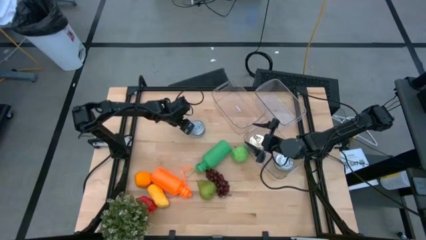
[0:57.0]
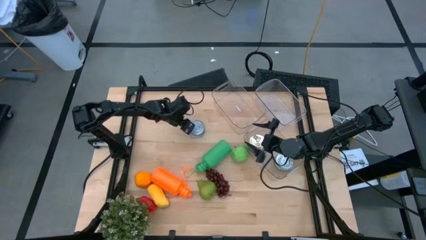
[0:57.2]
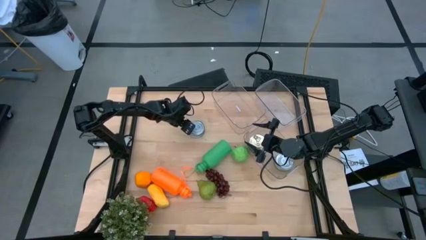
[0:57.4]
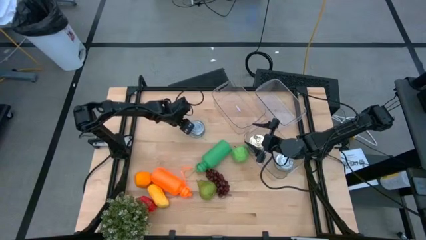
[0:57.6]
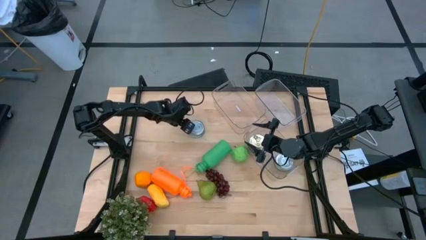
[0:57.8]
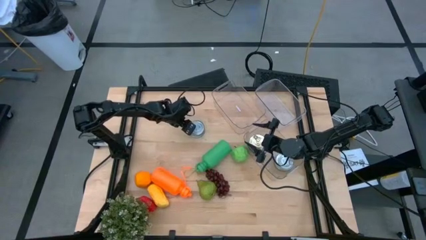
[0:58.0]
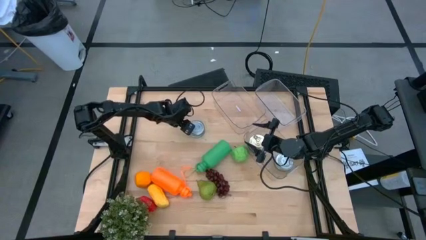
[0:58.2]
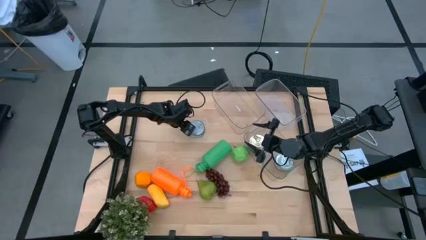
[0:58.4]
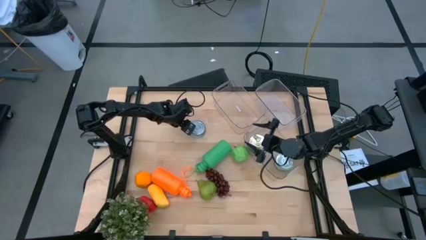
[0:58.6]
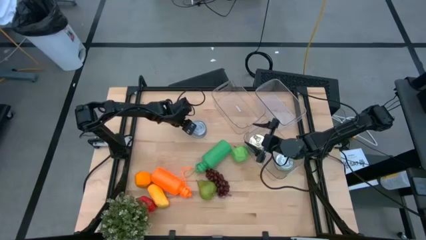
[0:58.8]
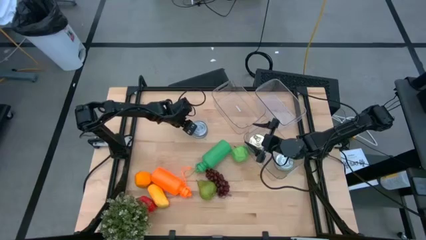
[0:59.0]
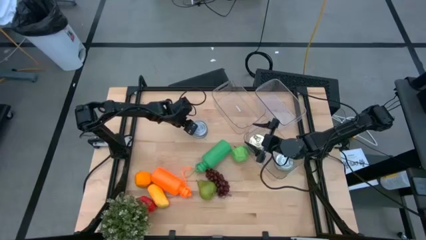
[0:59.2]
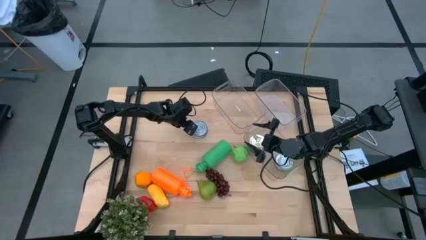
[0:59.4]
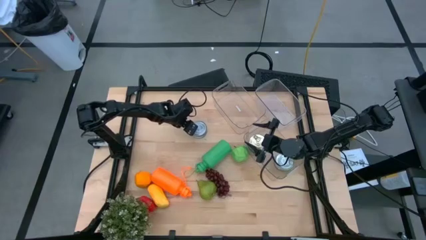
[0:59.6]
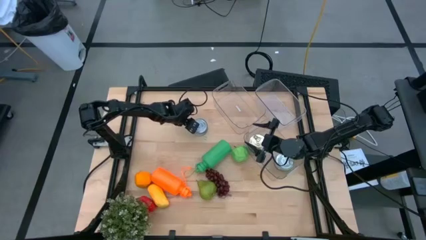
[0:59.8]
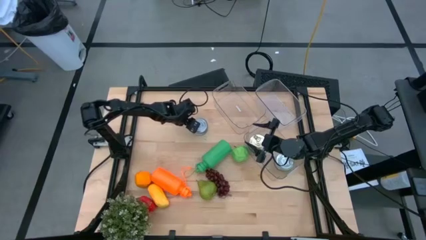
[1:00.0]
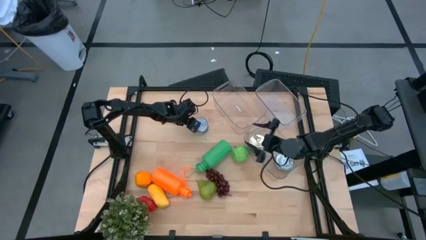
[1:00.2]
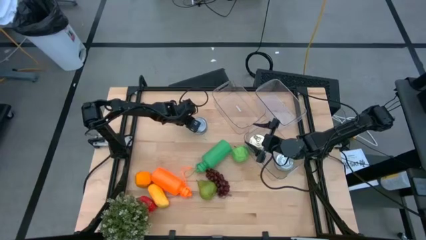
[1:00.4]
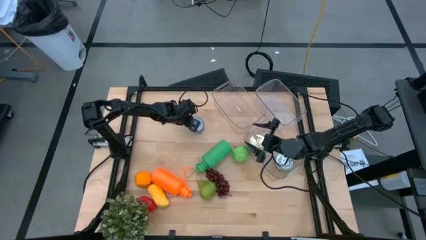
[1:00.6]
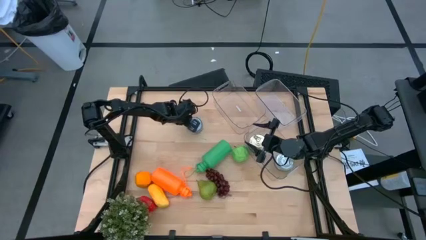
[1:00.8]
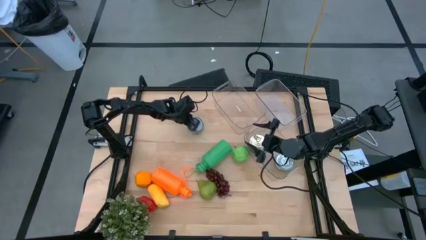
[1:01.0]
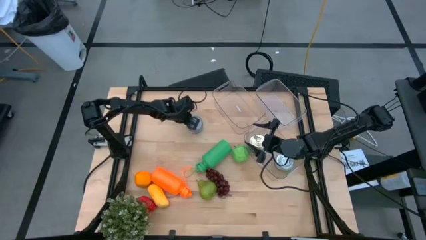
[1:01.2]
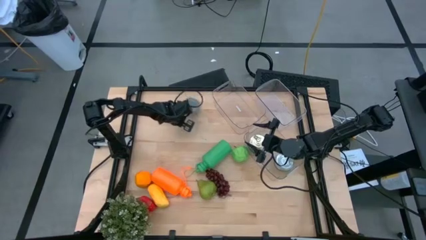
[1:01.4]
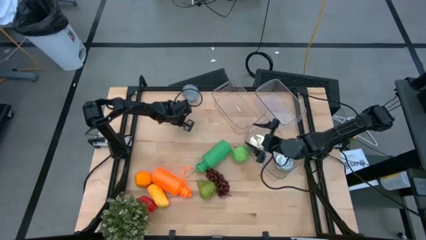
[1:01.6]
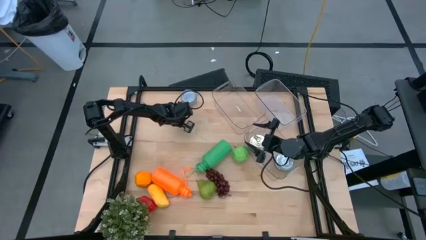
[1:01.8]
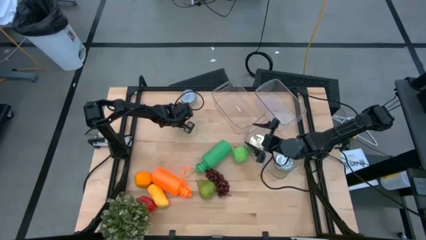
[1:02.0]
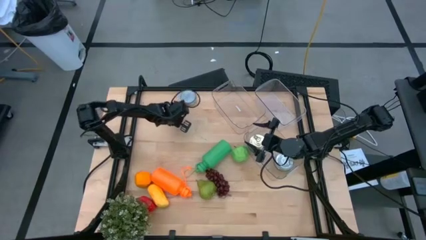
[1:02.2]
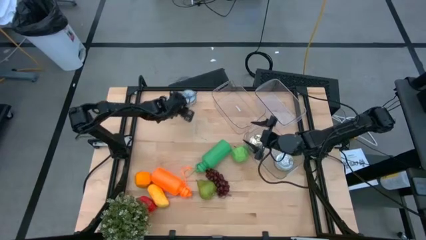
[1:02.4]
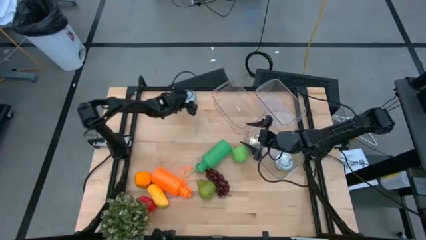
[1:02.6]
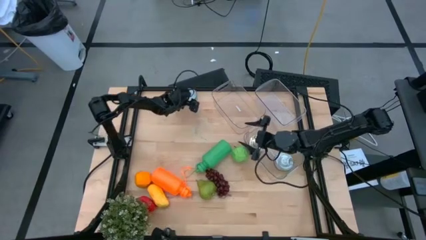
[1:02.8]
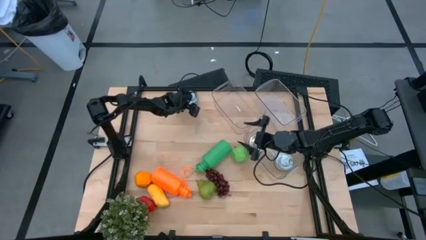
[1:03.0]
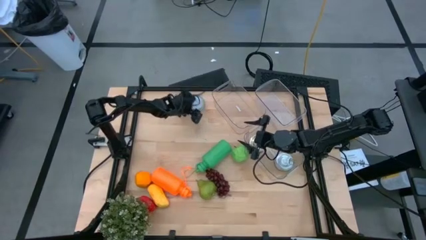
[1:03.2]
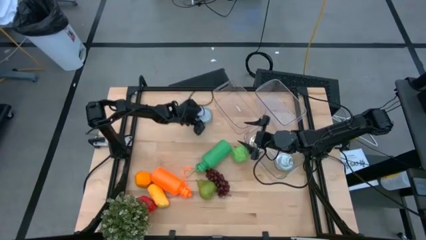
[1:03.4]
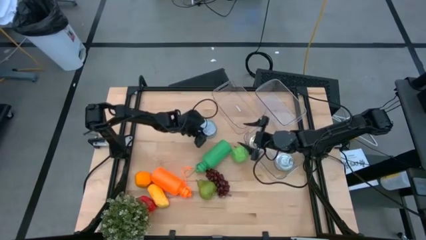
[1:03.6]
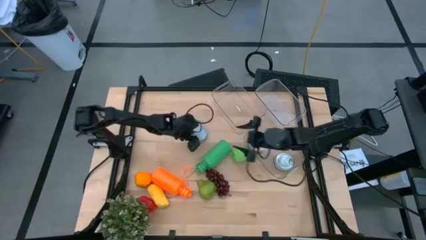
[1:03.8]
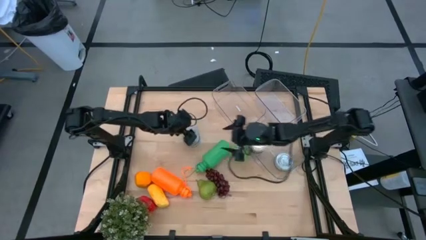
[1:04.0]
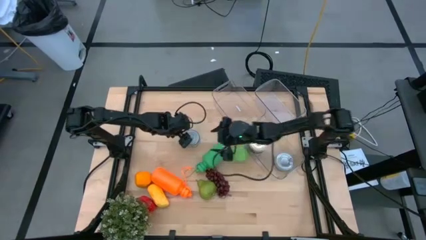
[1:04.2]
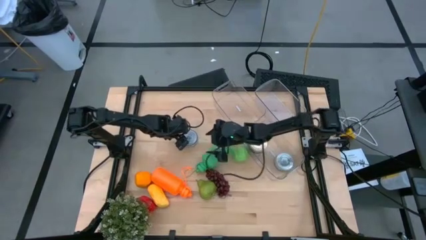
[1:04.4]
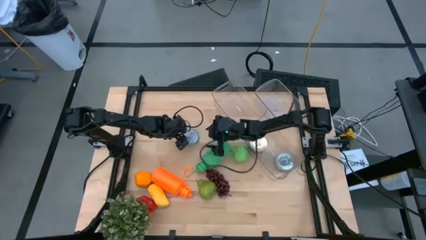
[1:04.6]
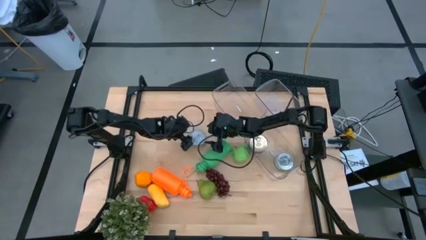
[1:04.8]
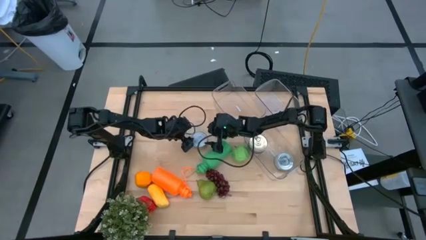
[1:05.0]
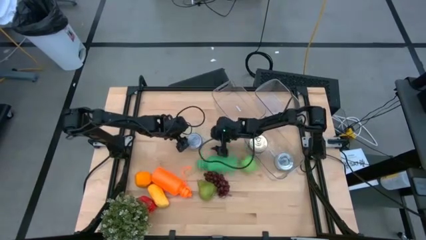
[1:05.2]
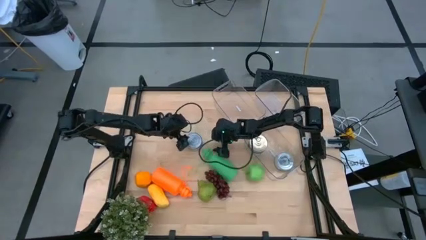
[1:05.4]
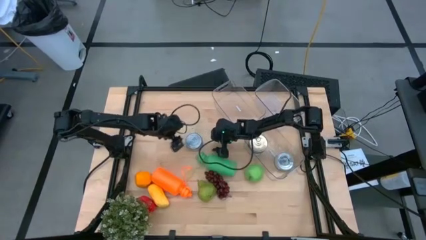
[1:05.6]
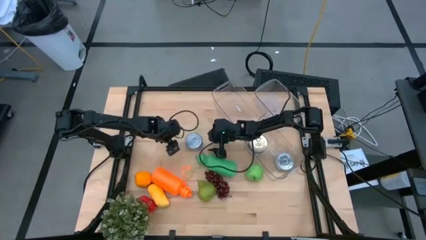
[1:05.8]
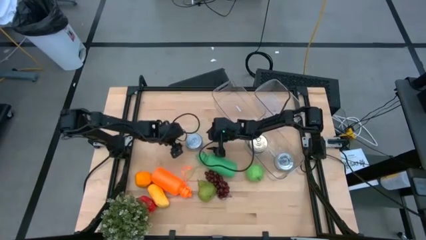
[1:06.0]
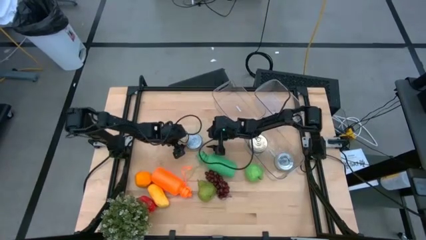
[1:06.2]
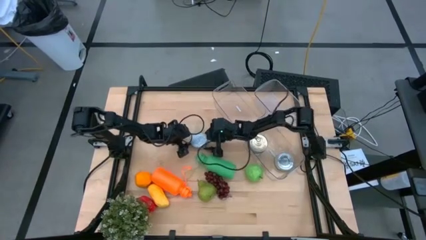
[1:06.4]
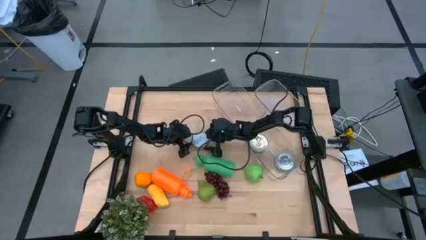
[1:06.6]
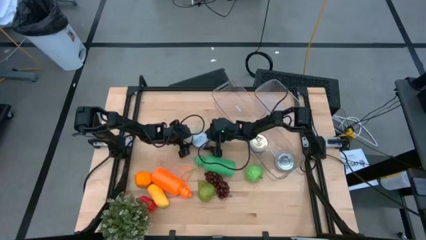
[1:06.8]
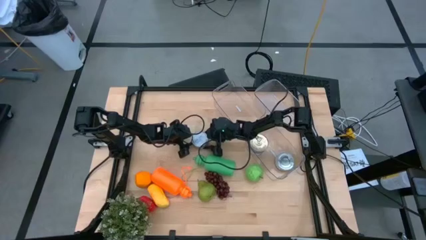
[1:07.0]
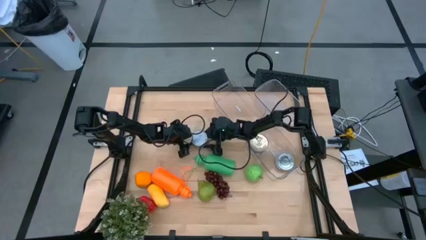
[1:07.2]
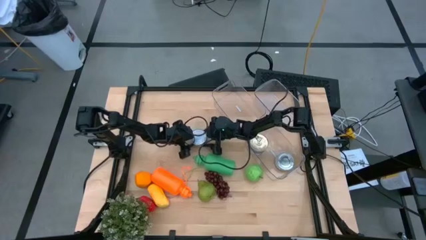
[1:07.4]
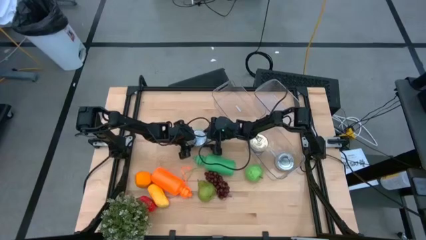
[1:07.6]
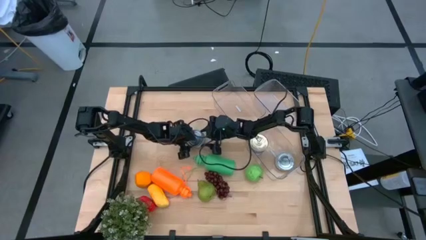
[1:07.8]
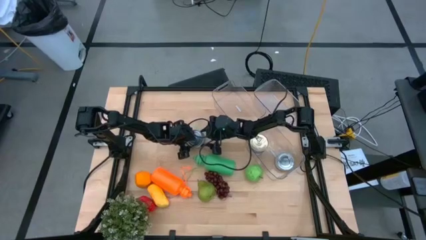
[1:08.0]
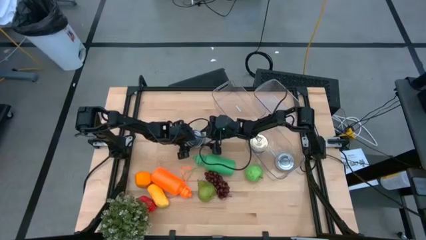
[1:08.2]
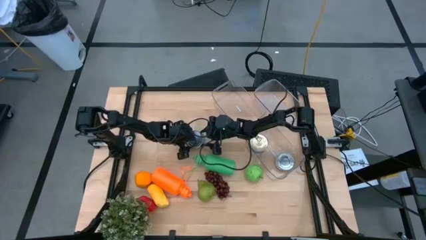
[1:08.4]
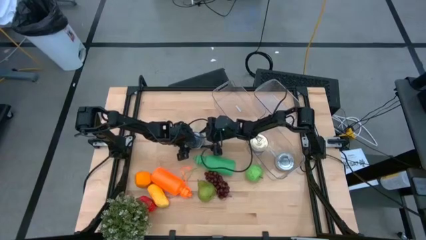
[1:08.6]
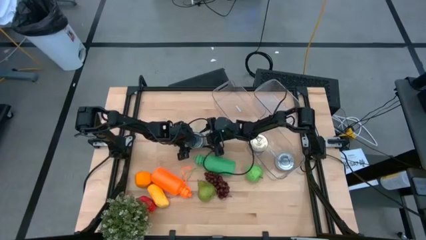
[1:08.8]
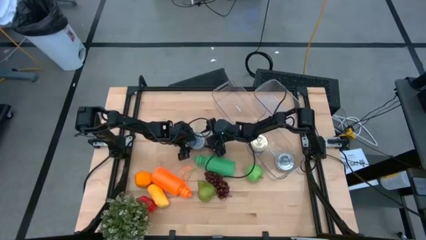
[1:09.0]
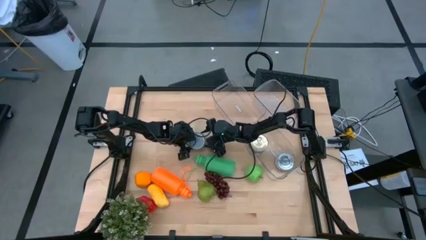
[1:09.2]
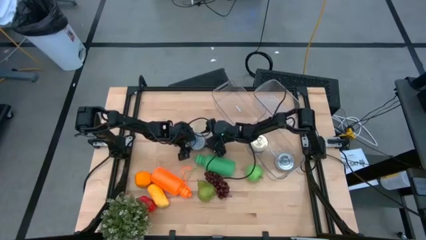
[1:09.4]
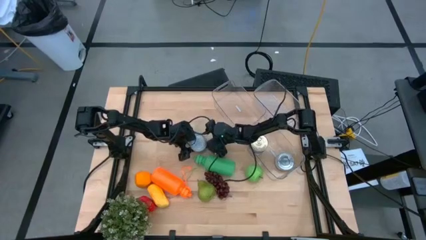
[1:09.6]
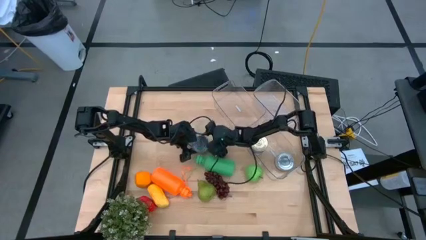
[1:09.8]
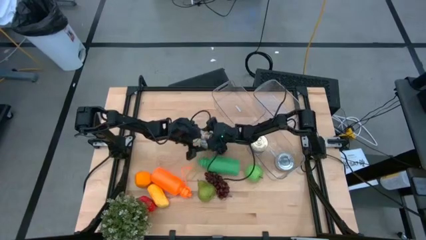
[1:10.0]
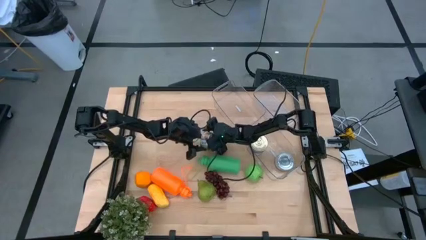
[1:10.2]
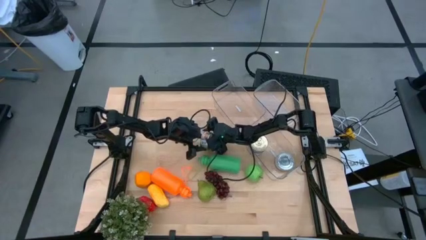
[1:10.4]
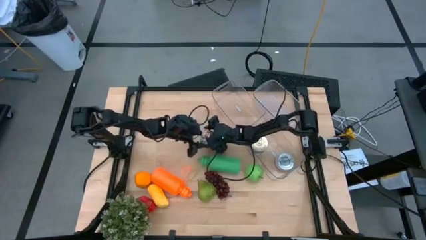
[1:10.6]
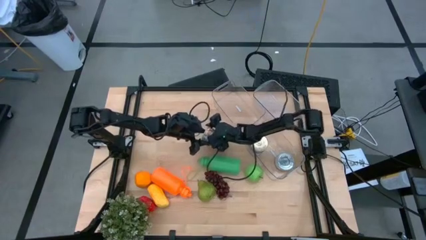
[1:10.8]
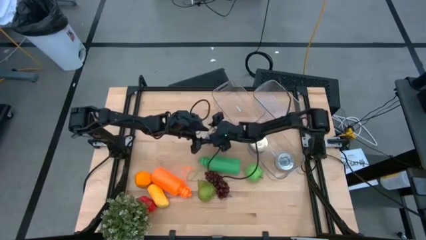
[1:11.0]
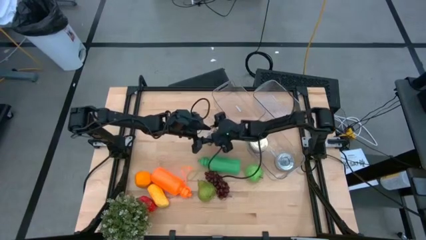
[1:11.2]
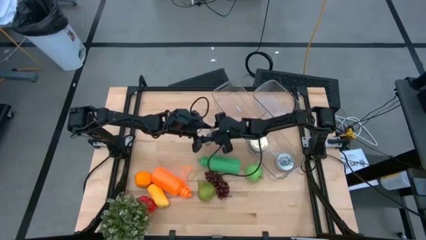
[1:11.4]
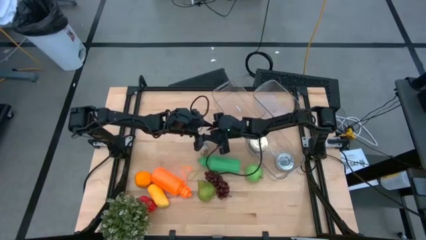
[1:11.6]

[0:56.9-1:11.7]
Task: Pick & Place Food Item
Put the green tuna can into the bottom transparent bin
